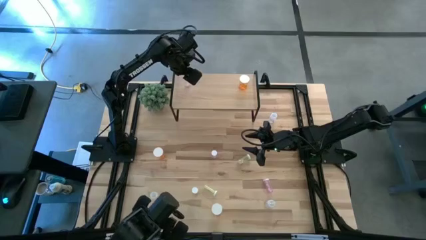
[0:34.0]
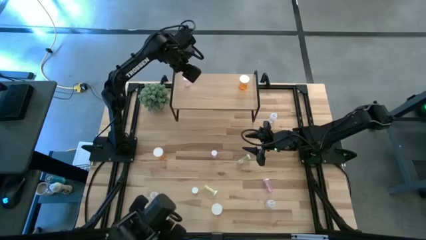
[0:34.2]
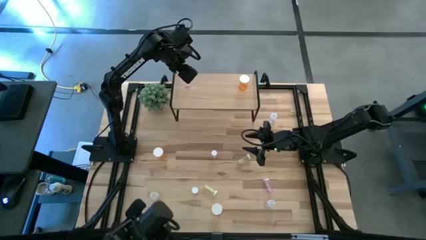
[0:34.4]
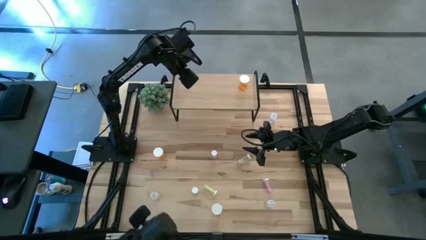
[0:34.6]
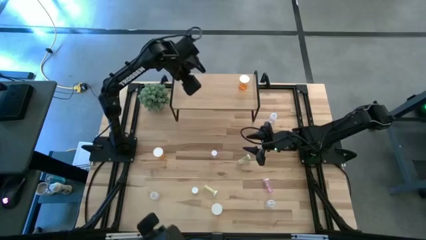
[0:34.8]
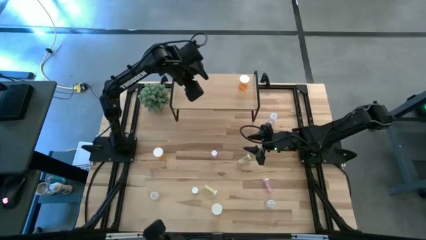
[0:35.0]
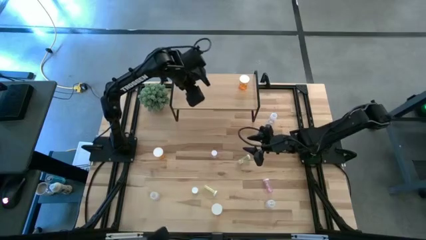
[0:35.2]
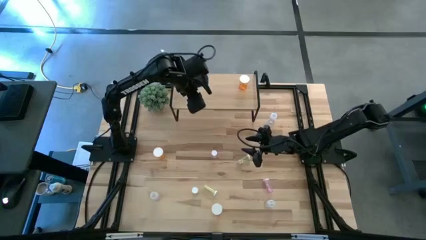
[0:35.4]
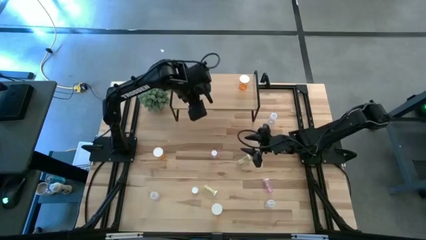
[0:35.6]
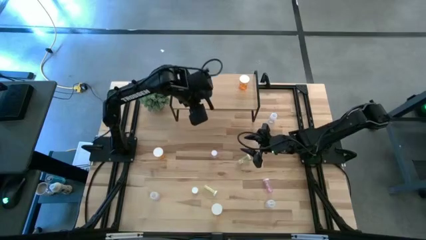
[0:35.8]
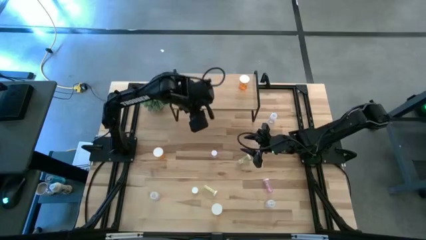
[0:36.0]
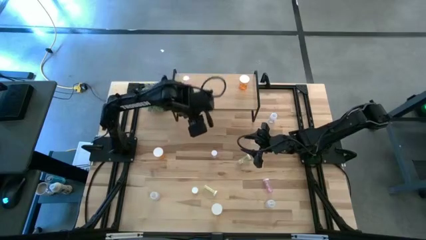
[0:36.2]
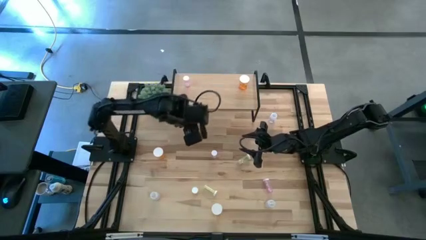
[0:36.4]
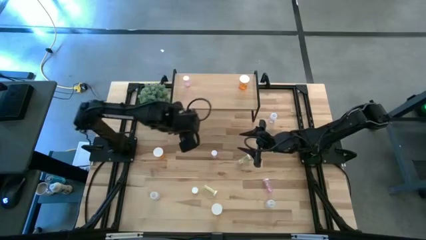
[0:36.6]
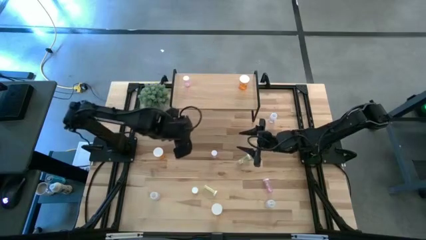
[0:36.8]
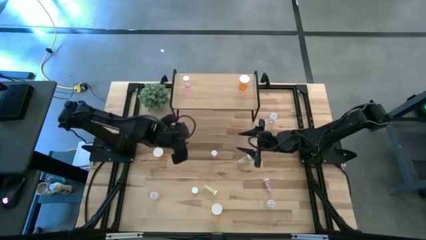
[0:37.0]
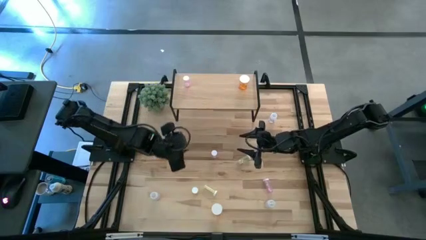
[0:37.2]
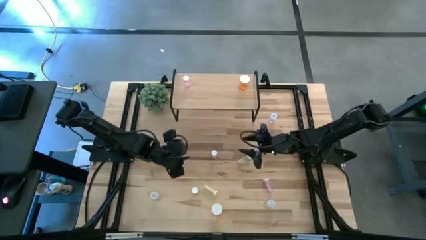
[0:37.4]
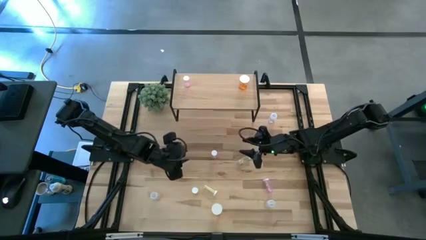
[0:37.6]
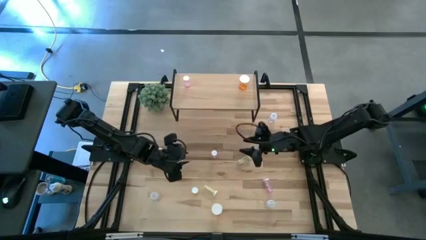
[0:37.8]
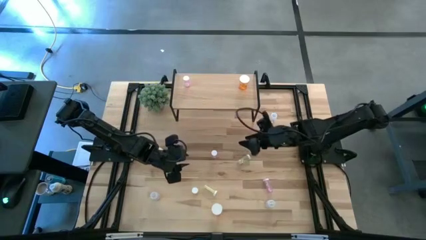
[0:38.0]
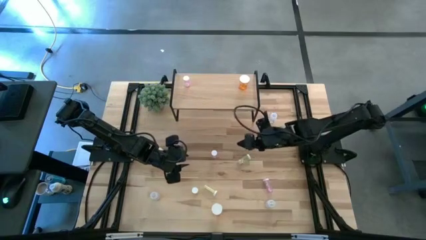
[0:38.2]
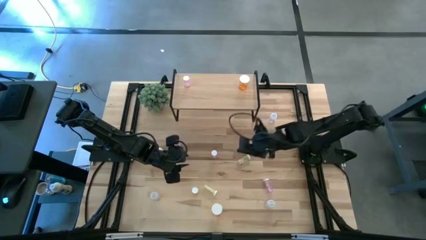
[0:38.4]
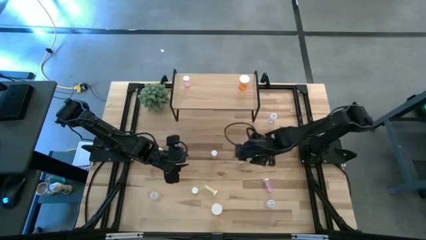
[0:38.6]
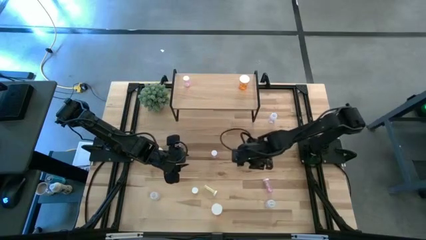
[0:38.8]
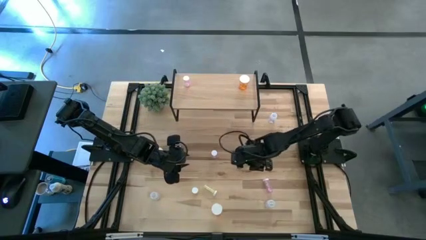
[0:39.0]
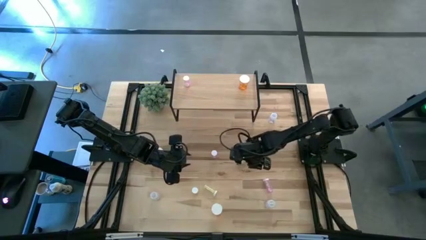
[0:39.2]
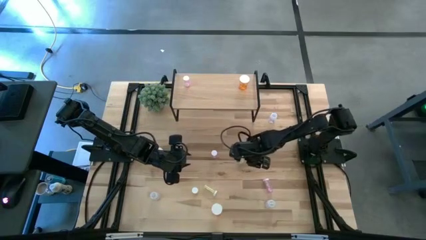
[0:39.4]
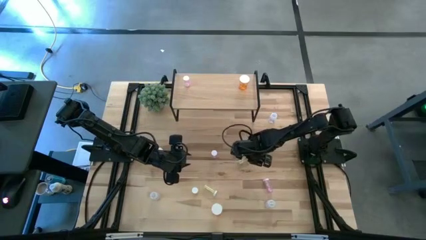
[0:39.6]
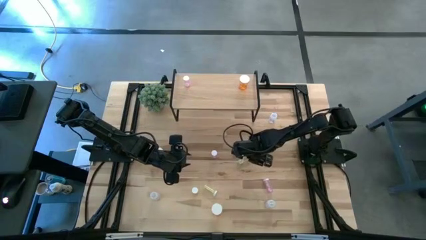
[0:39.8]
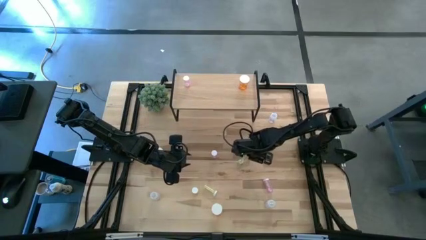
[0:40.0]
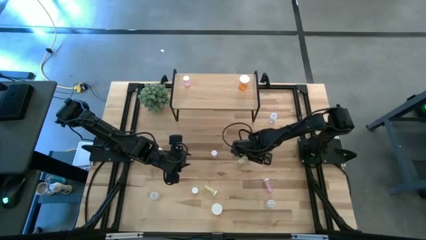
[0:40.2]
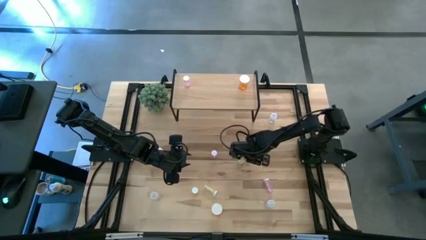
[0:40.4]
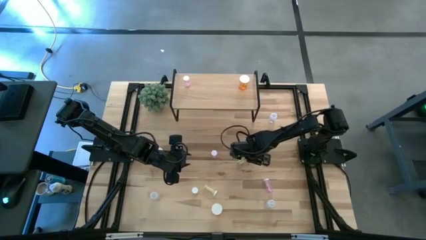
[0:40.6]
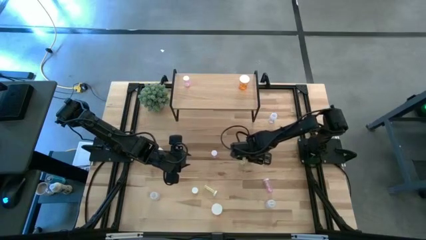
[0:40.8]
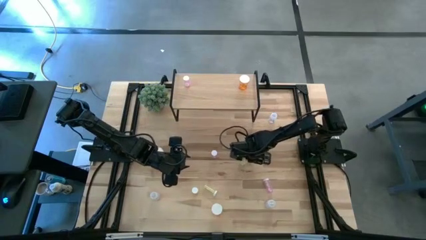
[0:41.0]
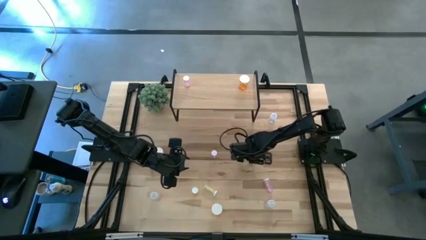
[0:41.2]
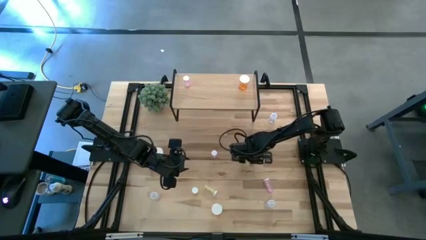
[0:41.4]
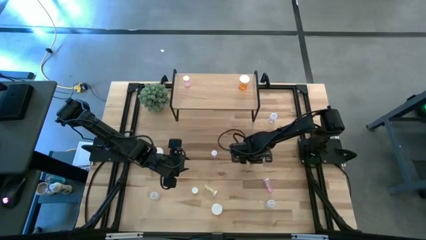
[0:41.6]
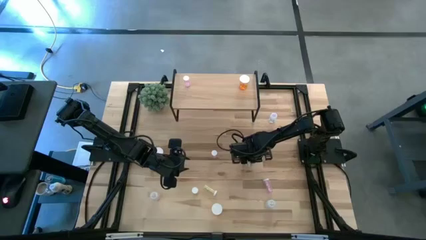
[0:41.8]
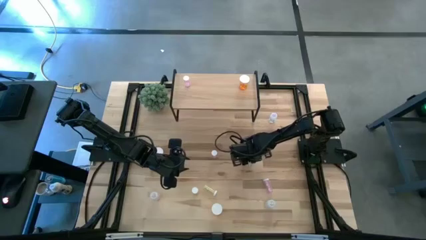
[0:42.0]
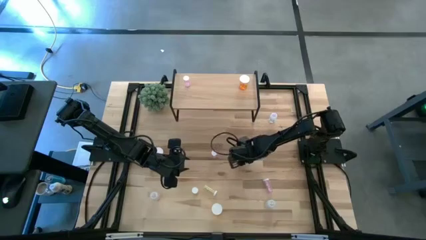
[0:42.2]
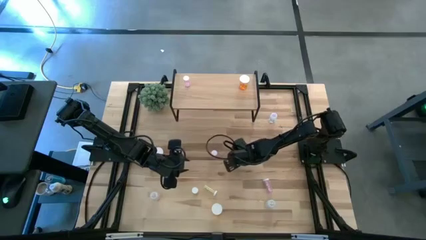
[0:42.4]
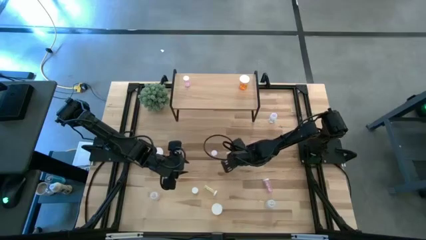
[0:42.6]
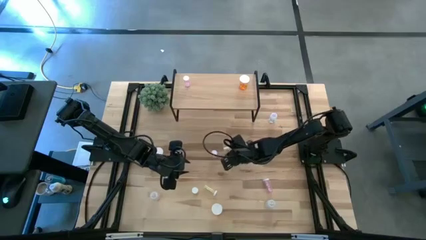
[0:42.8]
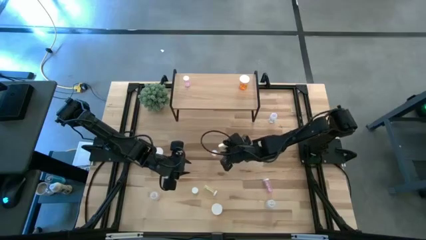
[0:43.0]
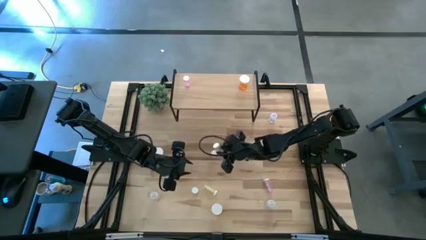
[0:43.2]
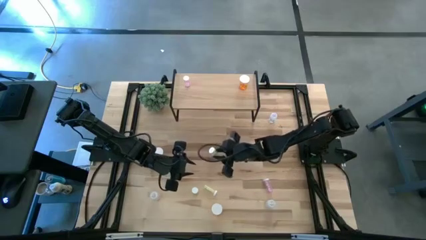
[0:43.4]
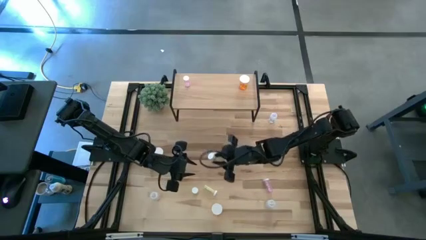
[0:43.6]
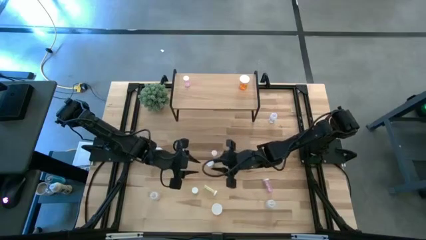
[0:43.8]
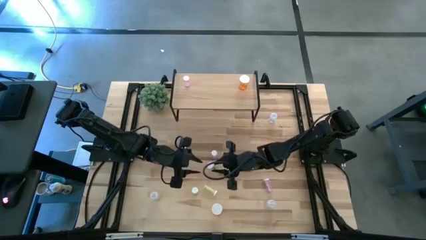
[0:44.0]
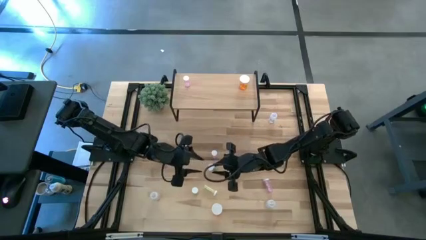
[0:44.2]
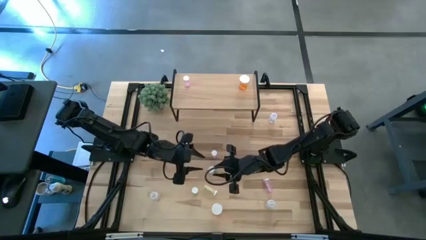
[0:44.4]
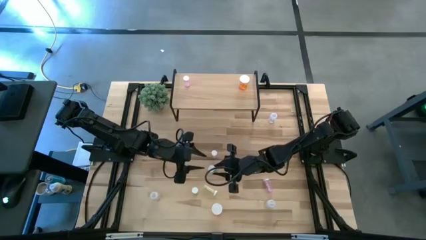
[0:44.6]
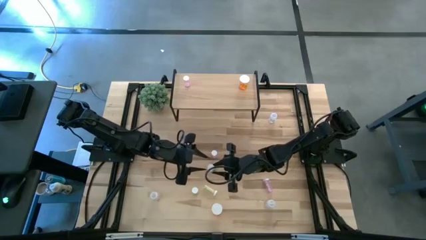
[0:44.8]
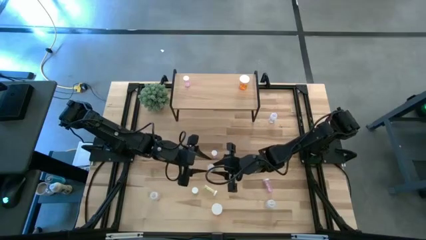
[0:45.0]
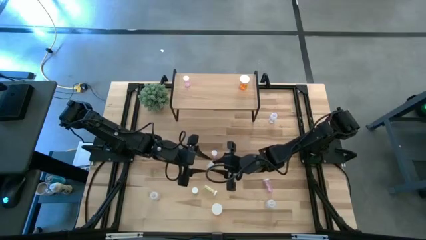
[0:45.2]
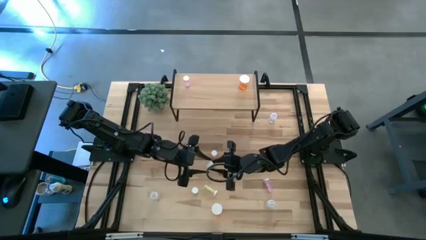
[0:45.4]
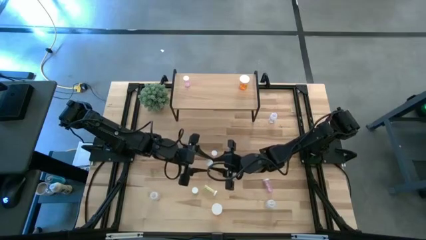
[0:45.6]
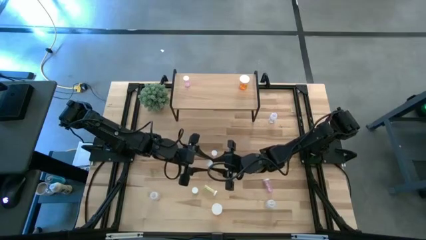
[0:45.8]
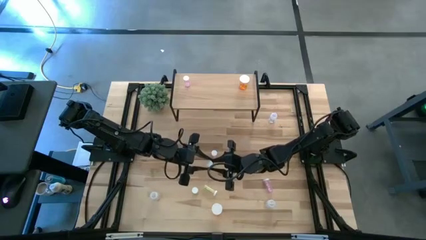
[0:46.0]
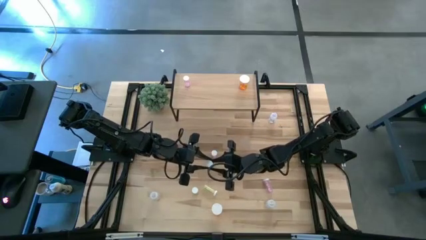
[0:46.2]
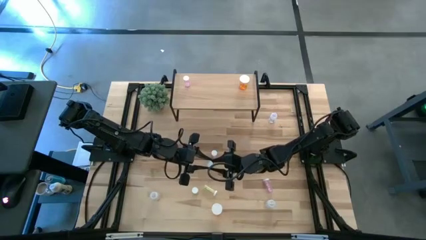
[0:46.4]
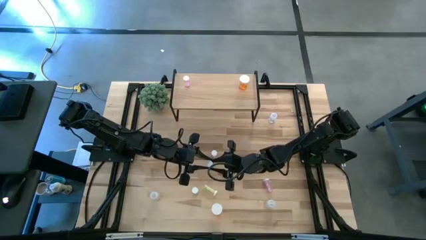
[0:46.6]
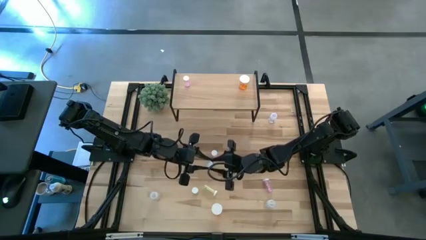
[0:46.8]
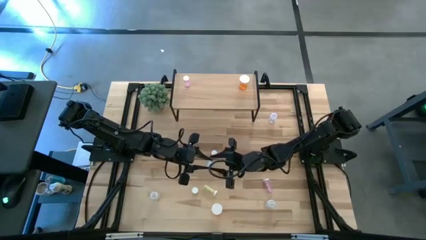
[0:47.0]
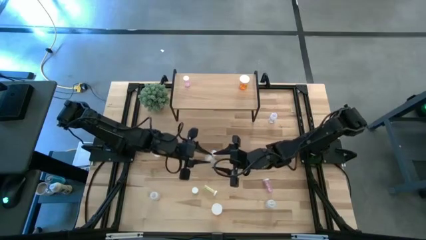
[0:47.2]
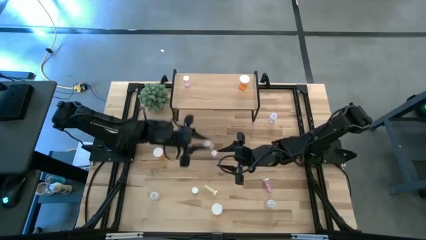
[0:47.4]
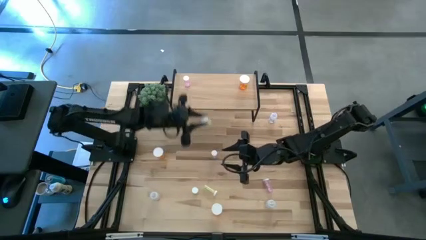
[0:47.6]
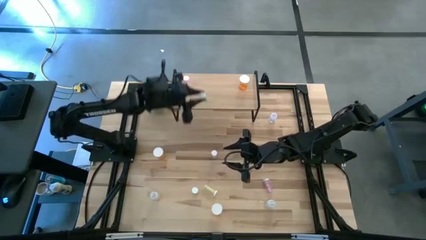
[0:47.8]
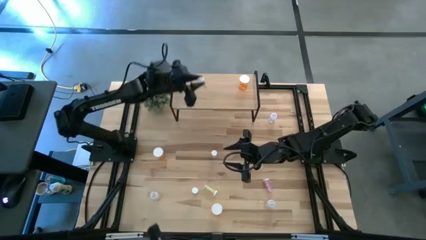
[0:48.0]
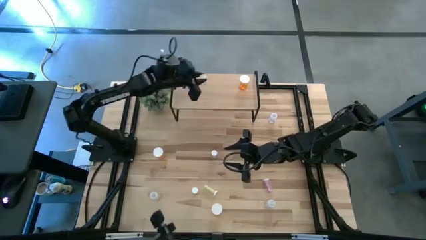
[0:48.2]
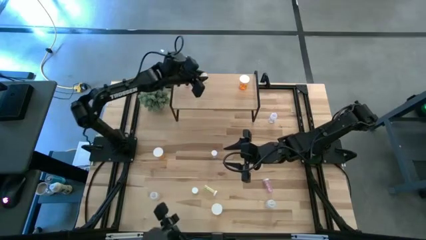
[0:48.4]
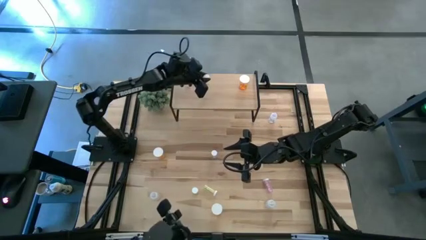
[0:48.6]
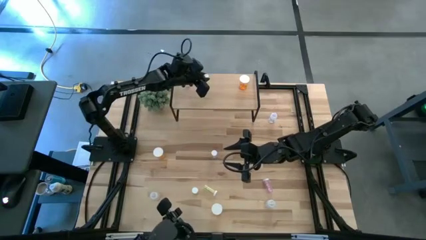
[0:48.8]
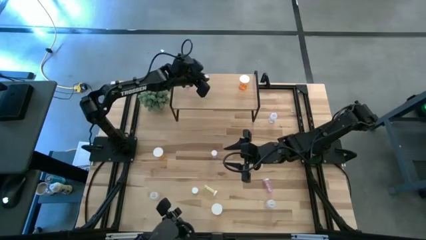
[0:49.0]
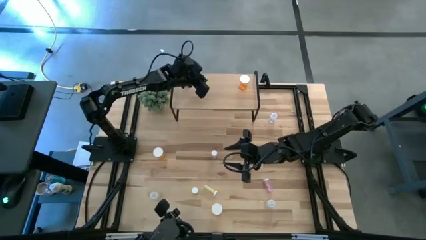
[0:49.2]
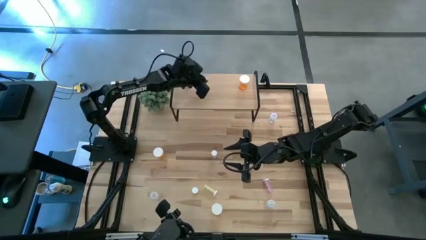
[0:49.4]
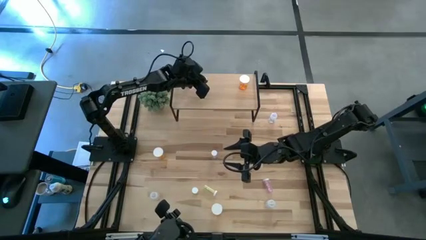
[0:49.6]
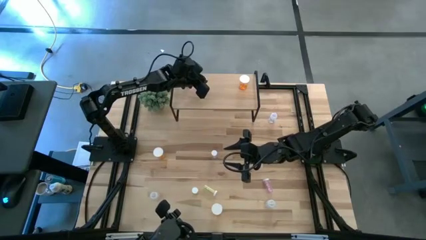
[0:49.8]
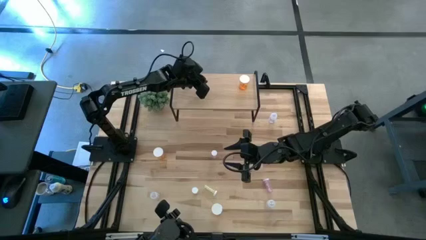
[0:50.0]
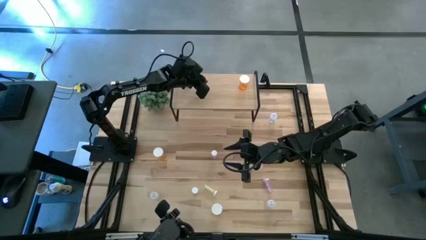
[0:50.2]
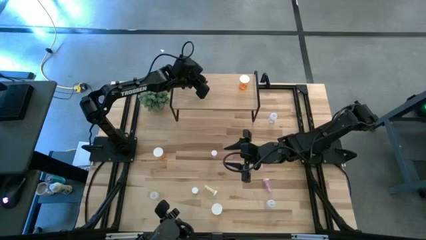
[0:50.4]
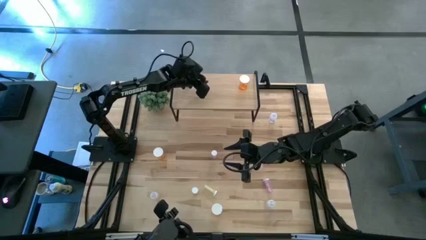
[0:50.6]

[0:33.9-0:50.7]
Task: Pick and place medicine bottles onto shelf by color
Put the top yellow pill bottle on the shelf
